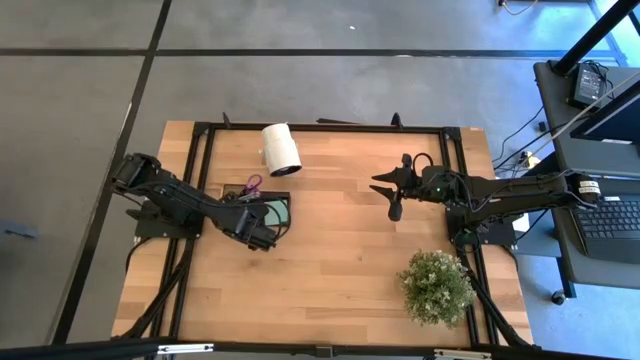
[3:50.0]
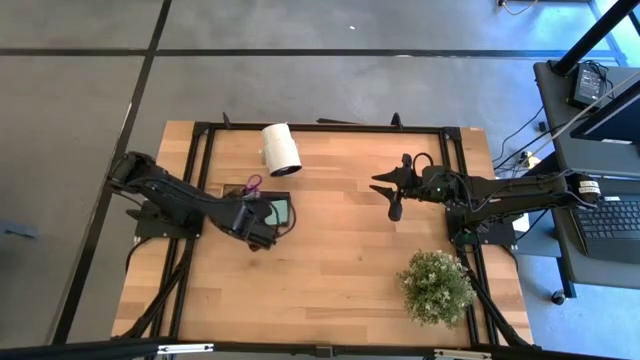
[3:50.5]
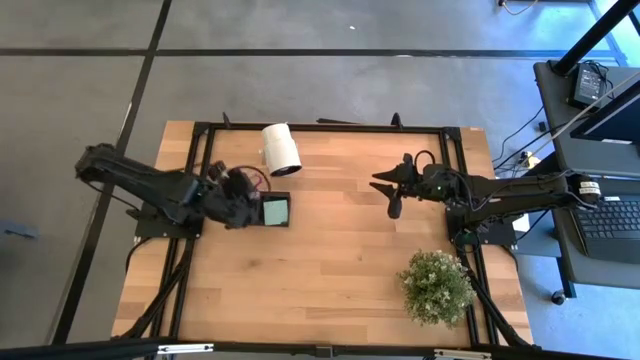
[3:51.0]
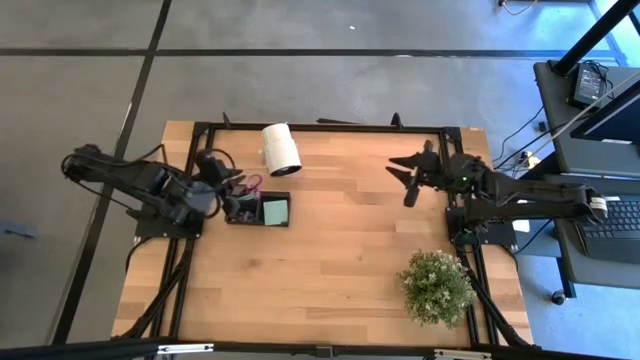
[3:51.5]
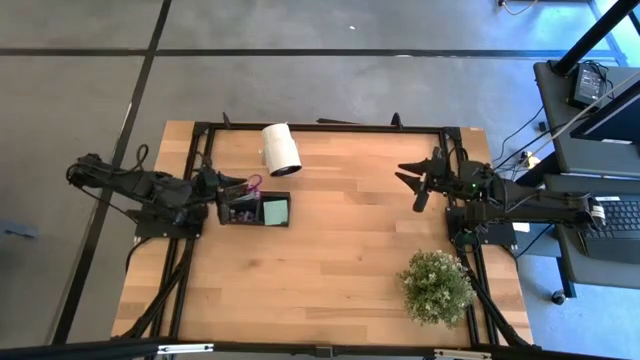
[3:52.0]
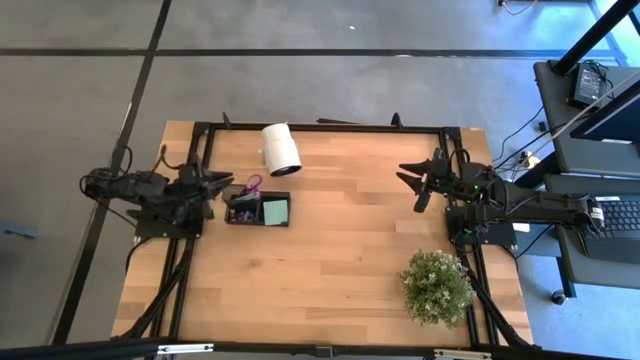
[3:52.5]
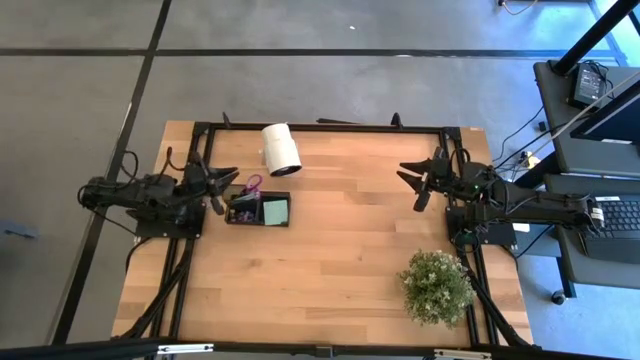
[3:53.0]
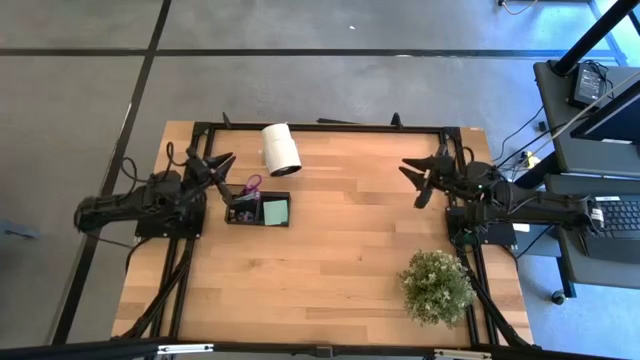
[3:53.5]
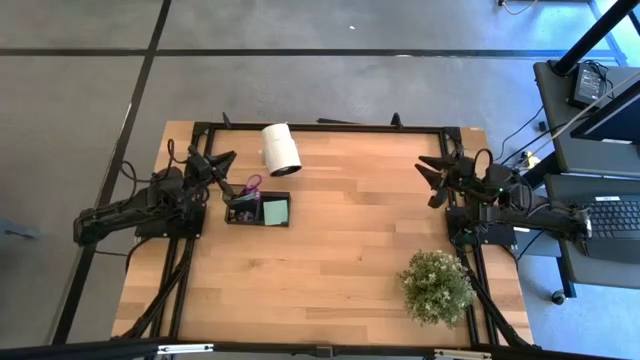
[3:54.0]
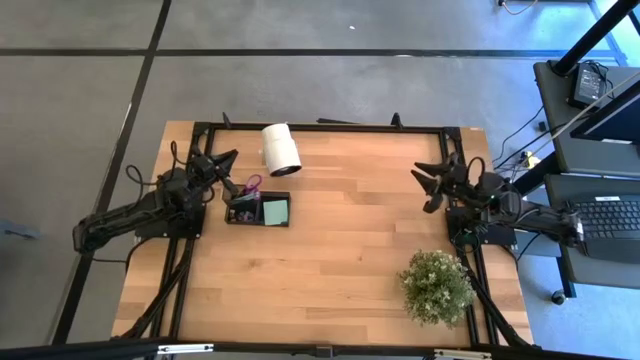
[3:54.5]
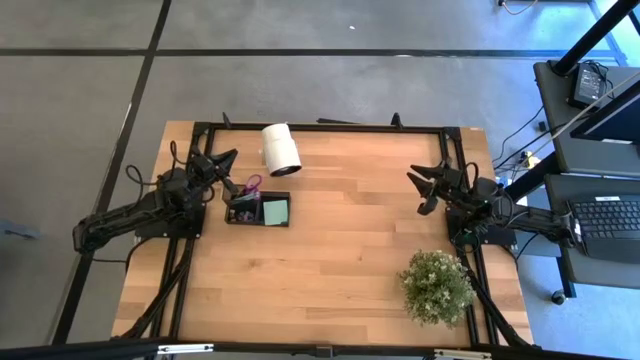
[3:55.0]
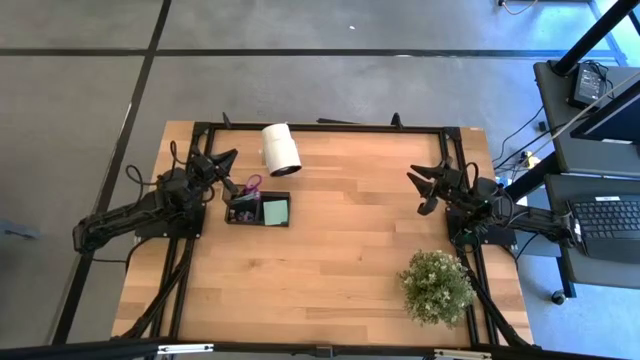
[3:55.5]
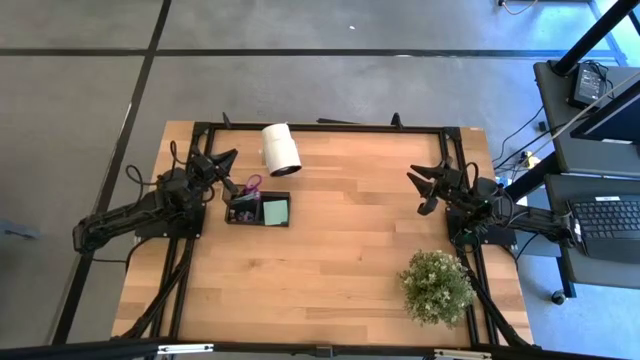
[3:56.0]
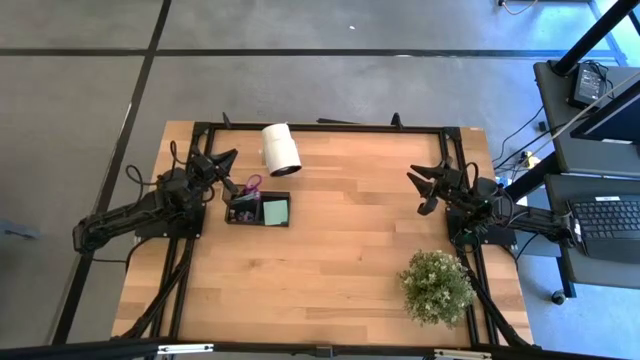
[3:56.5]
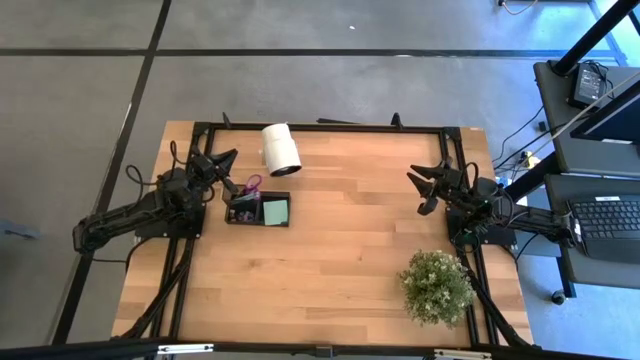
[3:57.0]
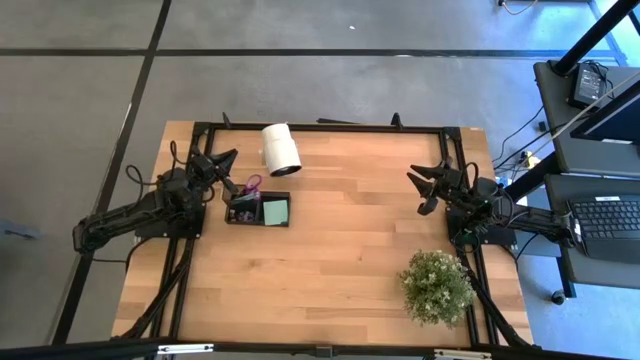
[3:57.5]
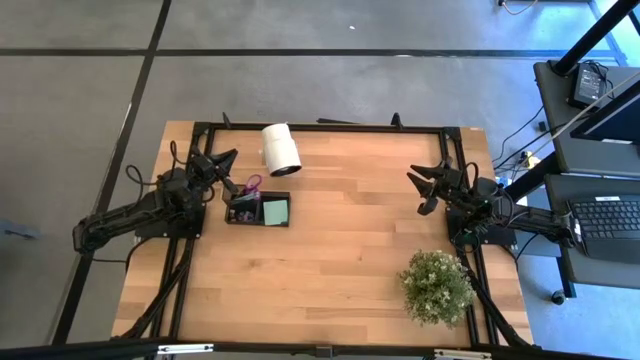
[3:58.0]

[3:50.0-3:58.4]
Task: Pick and place office supplies into organizer
Return to Home Position

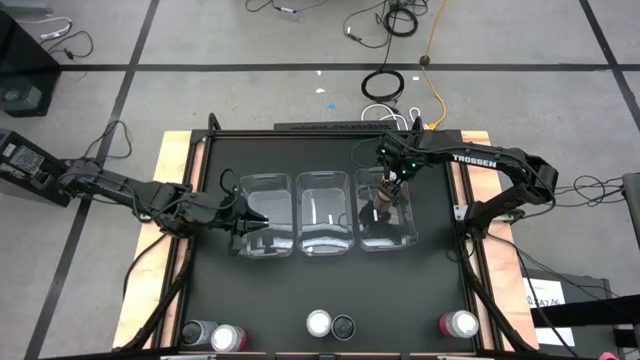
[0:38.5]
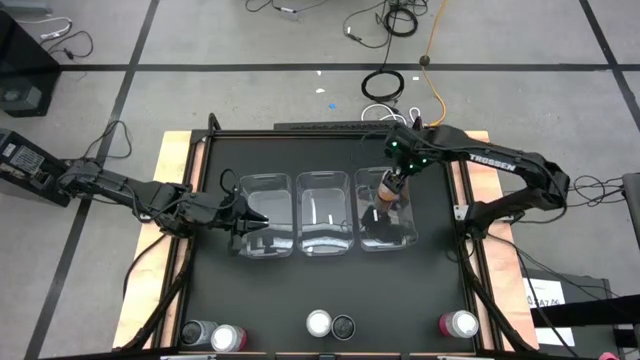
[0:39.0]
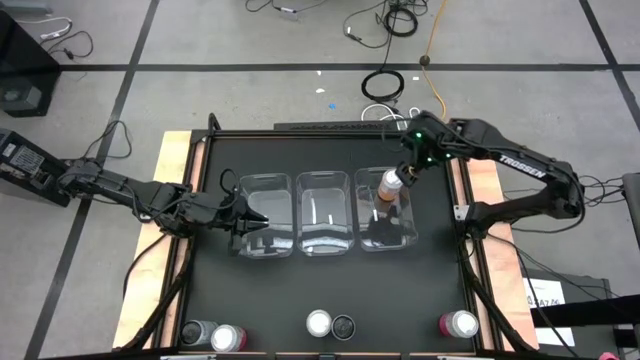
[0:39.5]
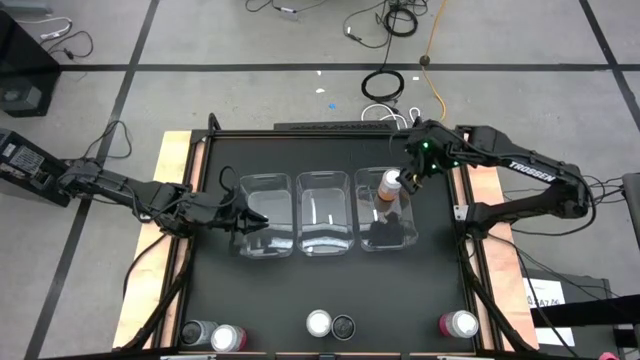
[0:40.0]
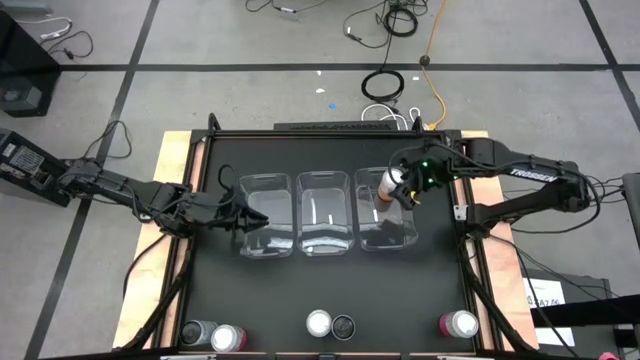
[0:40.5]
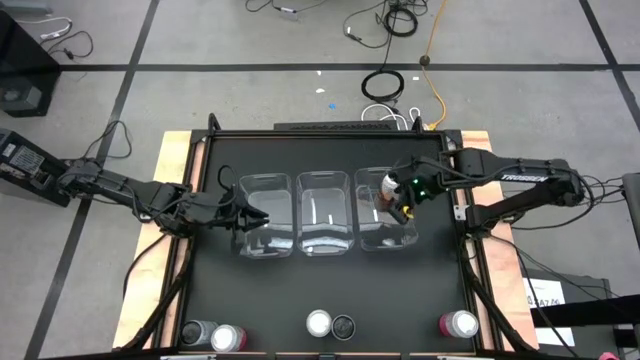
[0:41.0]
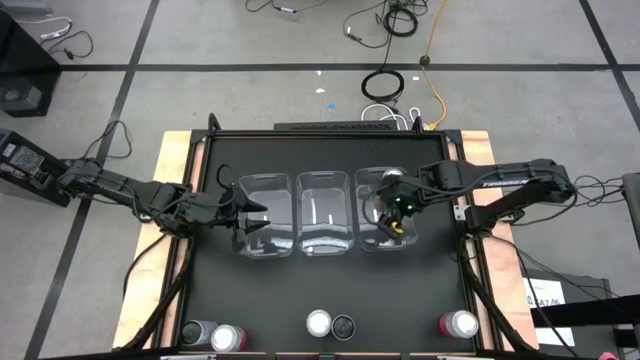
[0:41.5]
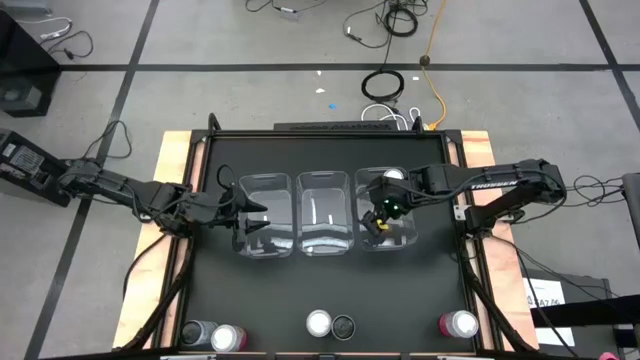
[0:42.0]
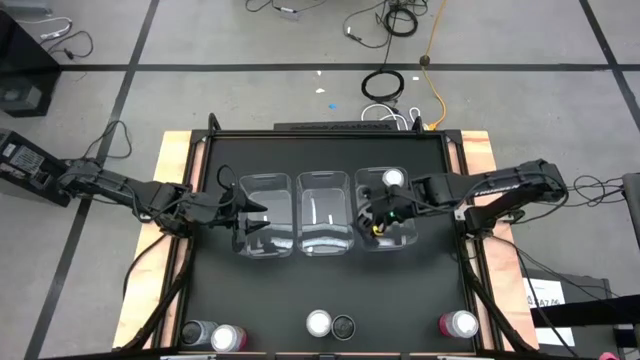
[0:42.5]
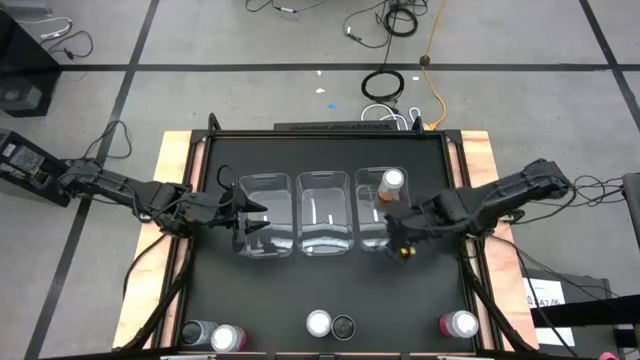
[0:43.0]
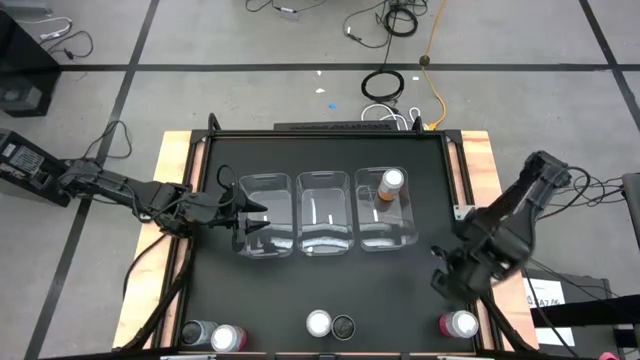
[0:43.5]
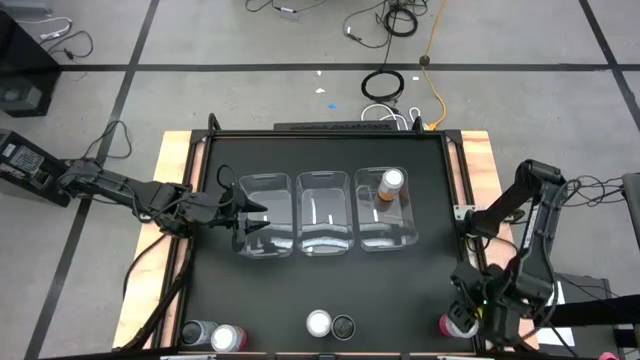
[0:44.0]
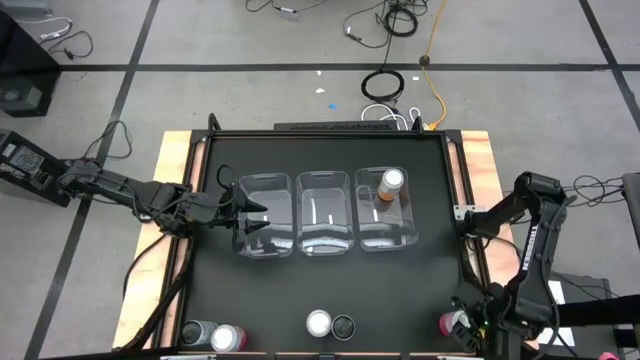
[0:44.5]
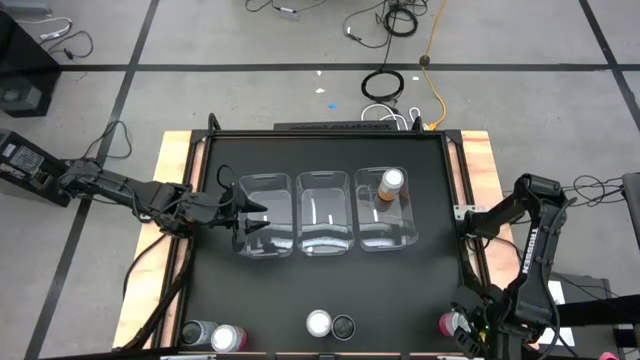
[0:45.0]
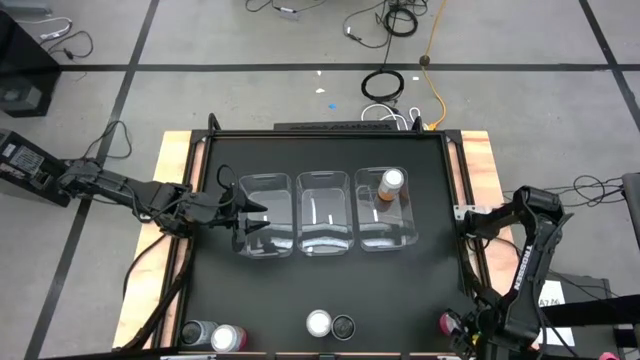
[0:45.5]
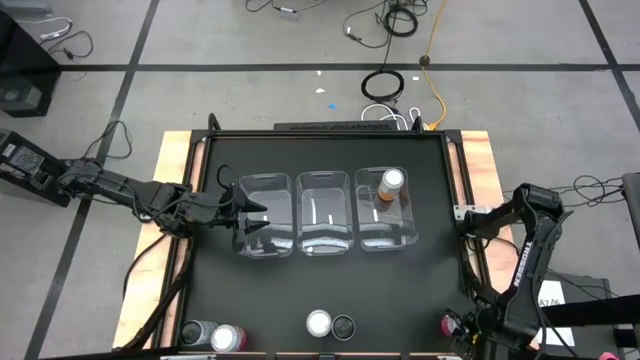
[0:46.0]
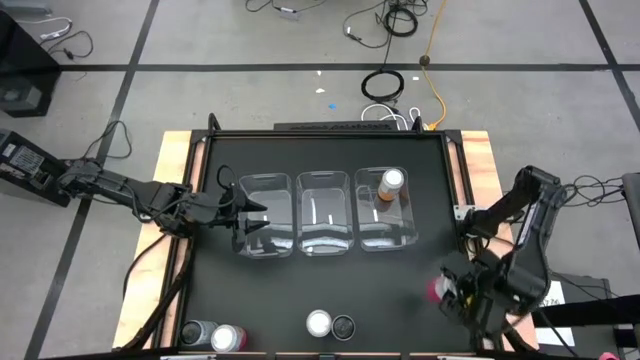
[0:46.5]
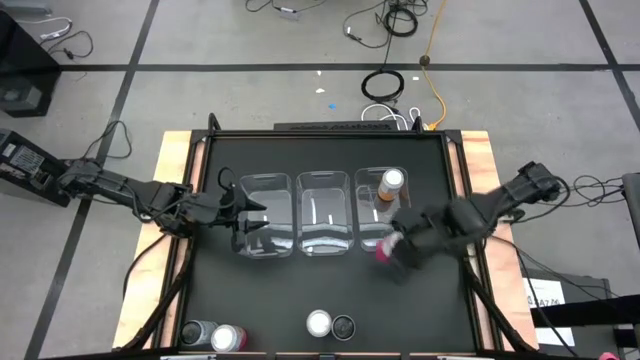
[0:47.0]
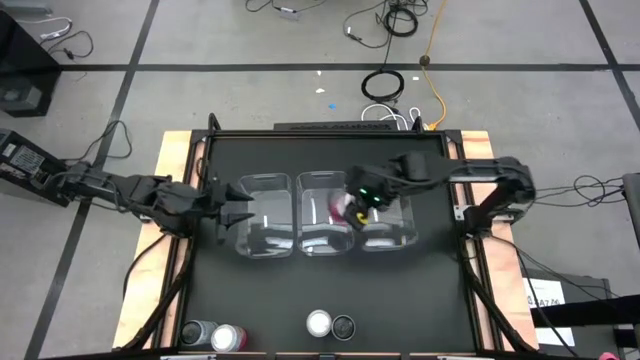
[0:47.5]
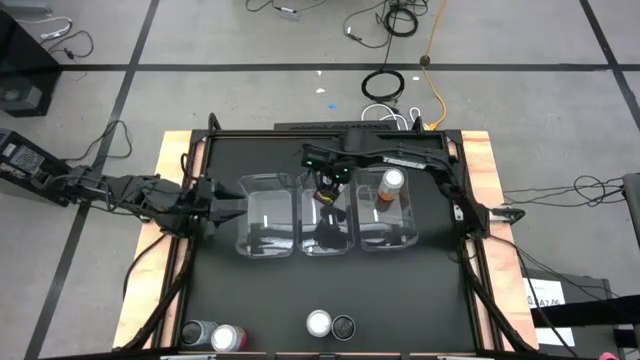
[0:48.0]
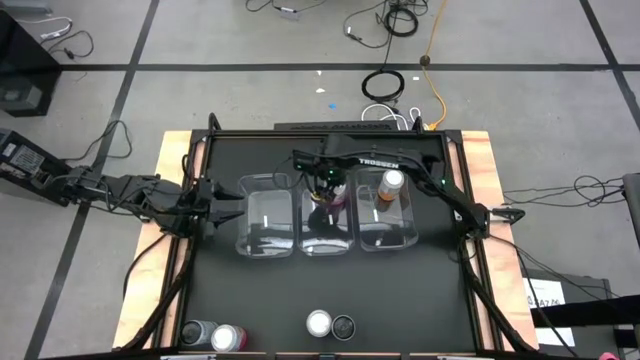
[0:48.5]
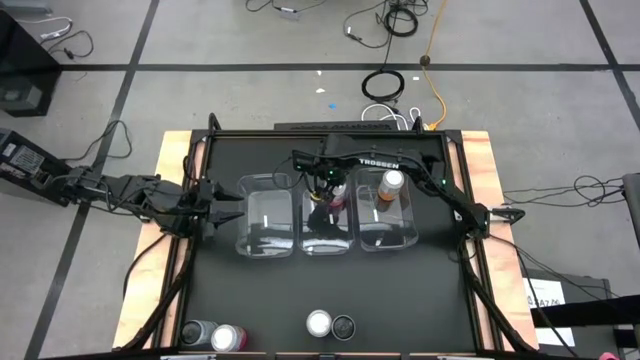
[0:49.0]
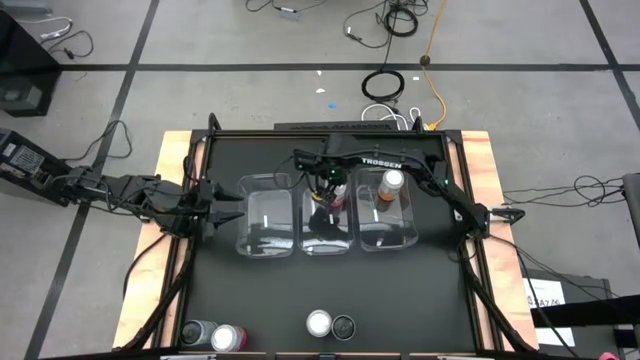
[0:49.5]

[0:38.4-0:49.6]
Task: Sort soda cans
Put the right pink soda can into the center transparent bin
